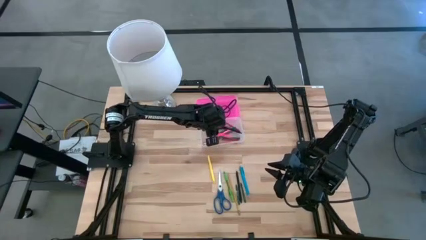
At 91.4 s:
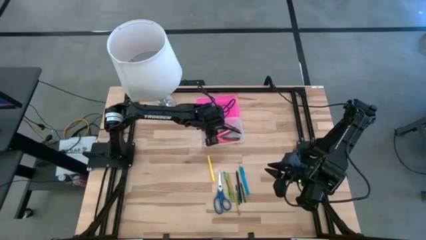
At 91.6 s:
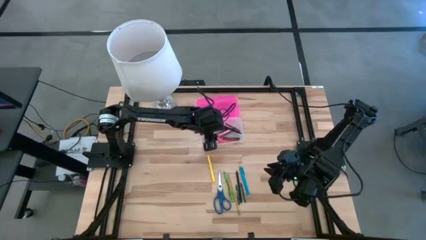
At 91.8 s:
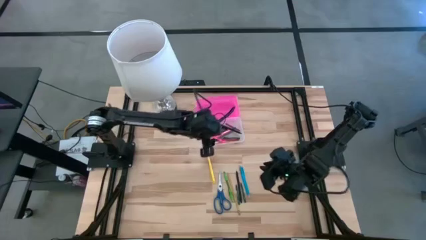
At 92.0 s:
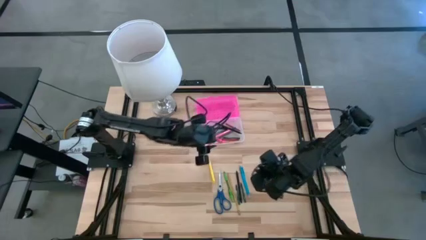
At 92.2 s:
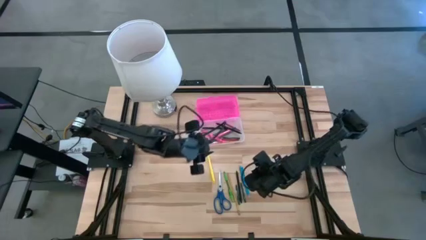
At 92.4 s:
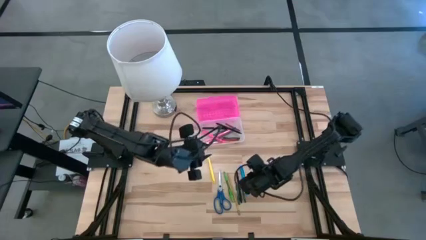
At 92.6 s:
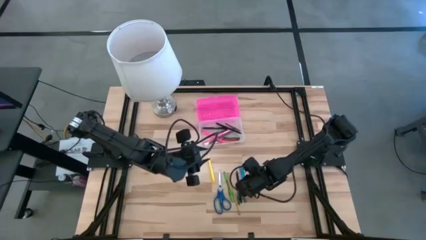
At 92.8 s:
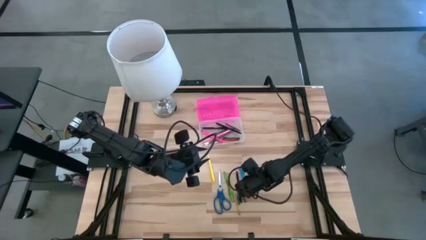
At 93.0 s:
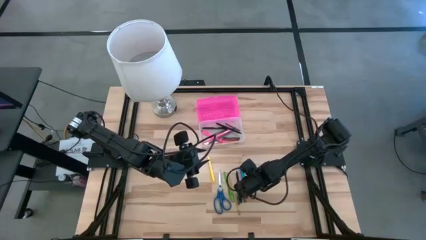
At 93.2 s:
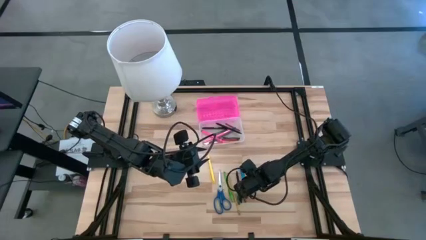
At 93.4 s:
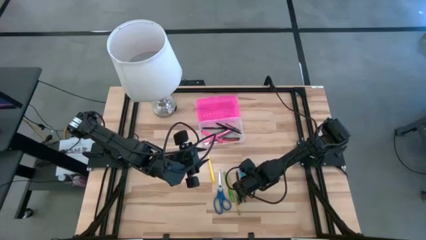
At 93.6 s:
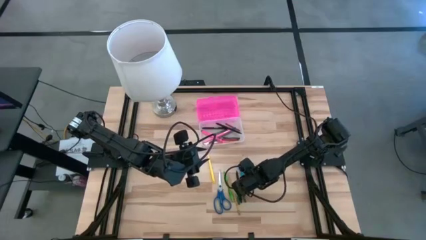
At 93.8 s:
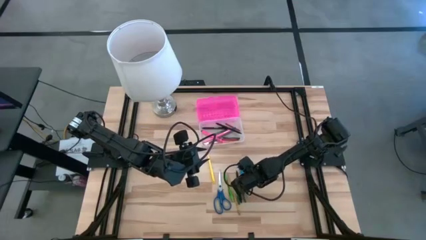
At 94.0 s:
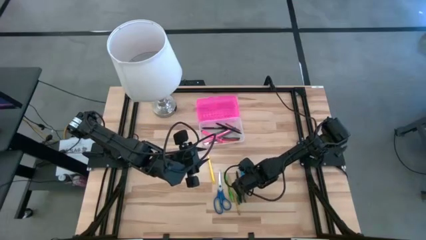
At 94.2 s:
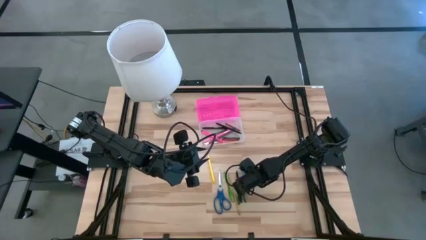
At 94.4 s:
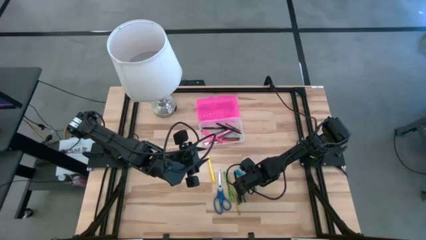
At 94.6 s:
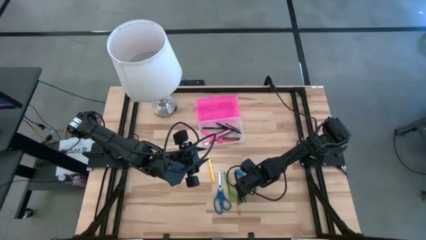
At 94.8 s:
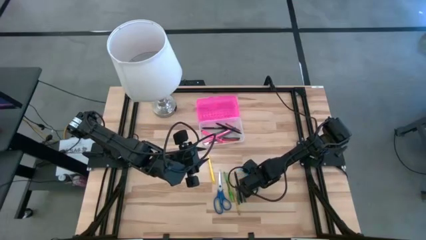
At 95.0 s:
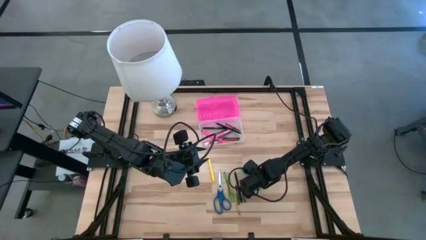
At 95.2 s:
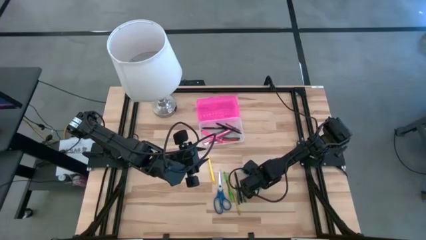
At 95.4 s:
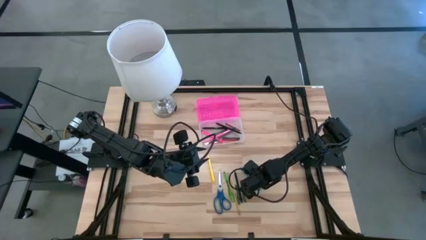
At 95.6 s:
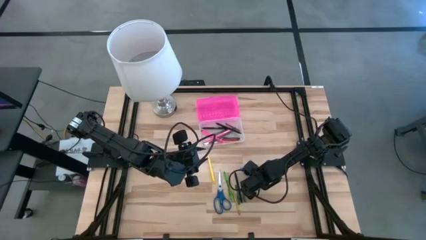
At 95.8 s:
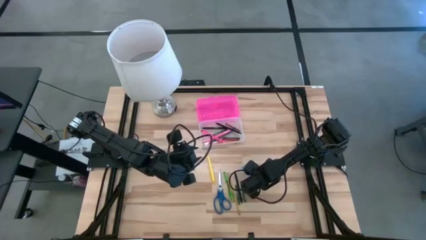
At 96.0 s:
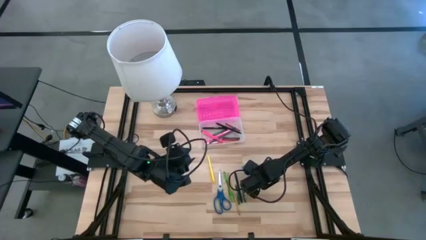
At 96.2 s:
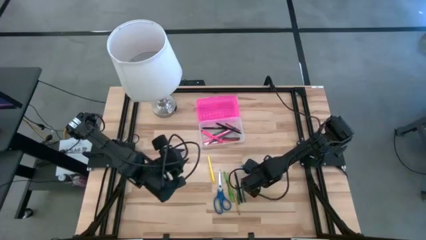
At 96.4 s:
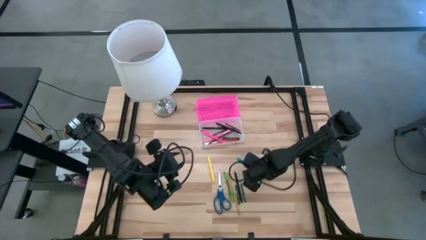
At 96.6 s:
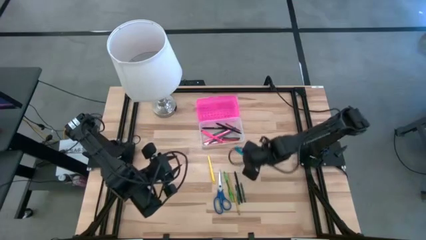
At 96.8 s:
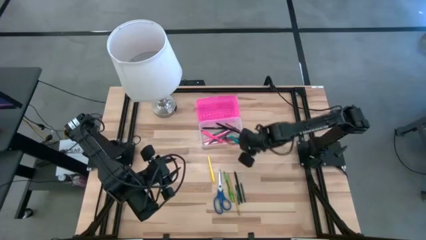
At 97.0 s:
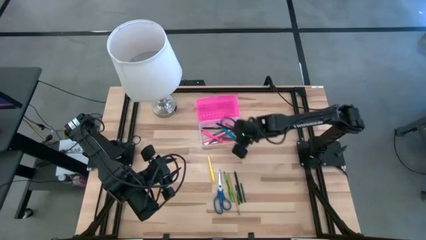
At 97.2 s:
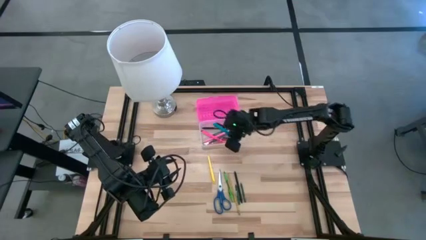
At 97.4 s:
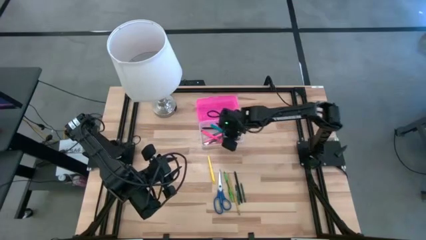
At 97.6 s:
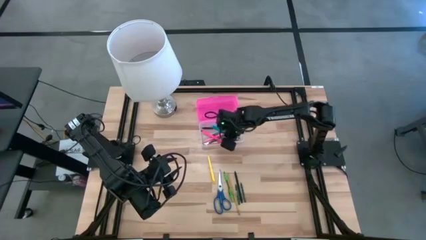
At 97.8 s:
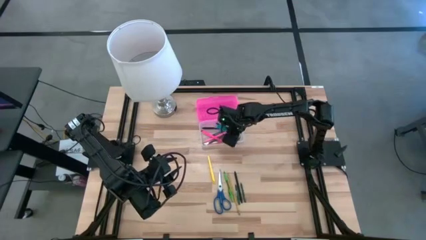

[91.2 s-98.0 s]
Task: Pick & place school supplies into a supply box
Put the blue pen into the pink supply box

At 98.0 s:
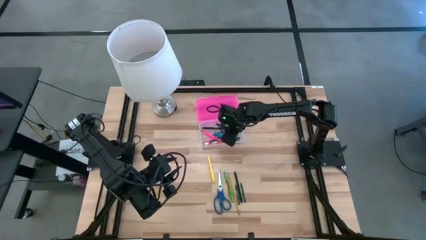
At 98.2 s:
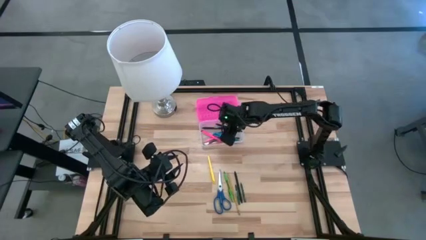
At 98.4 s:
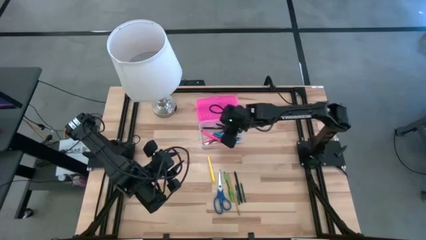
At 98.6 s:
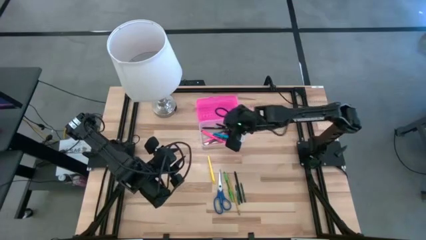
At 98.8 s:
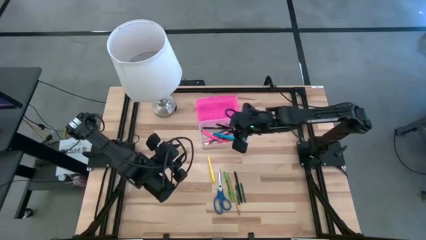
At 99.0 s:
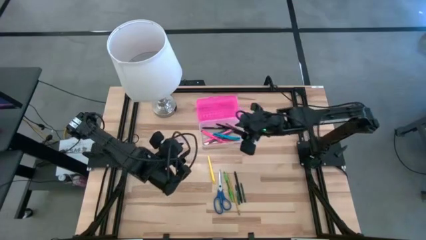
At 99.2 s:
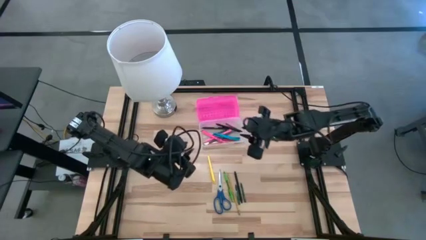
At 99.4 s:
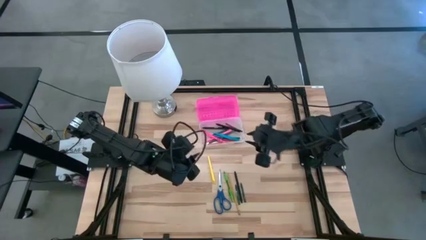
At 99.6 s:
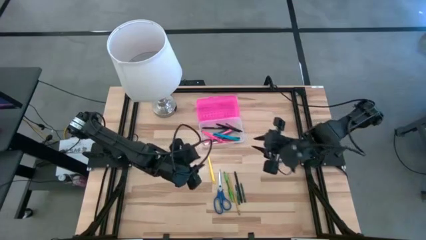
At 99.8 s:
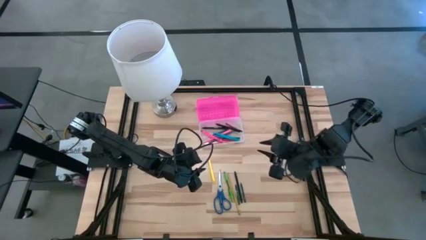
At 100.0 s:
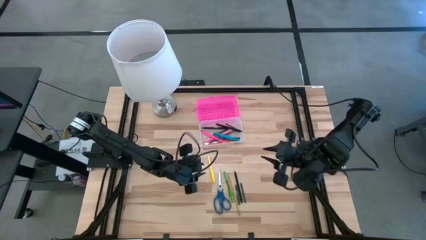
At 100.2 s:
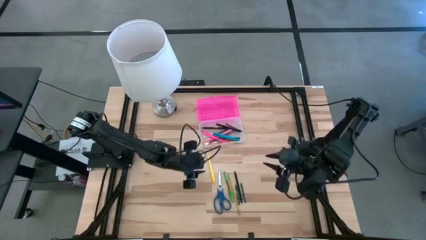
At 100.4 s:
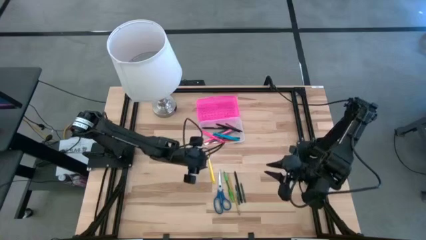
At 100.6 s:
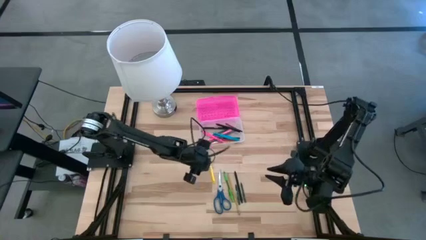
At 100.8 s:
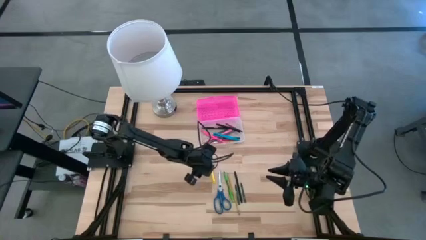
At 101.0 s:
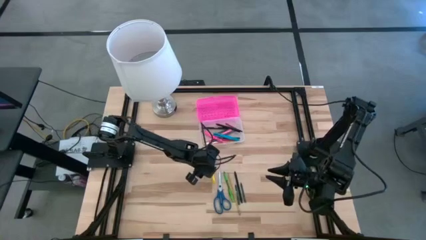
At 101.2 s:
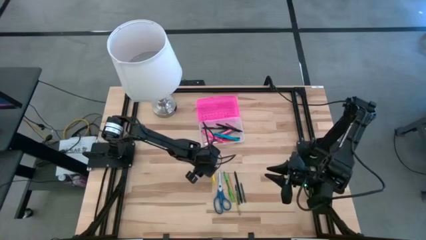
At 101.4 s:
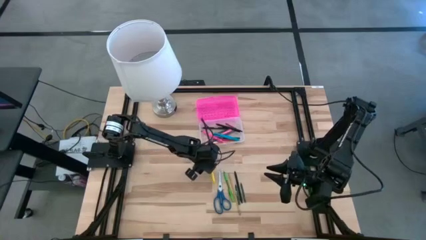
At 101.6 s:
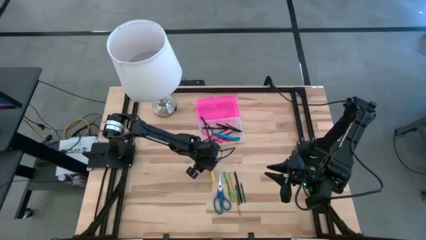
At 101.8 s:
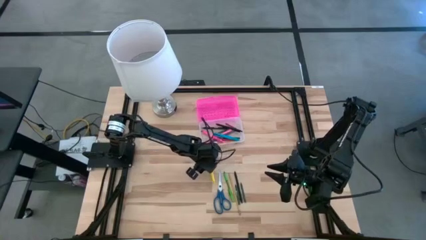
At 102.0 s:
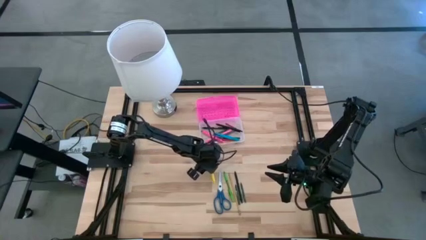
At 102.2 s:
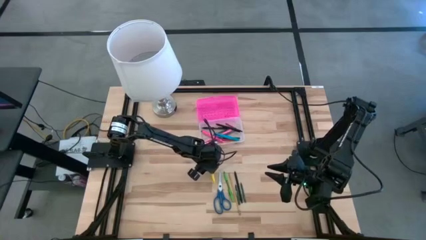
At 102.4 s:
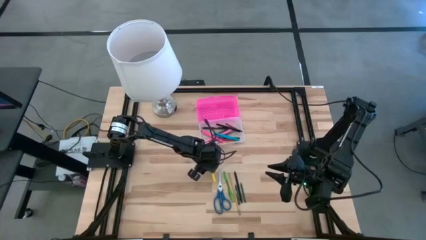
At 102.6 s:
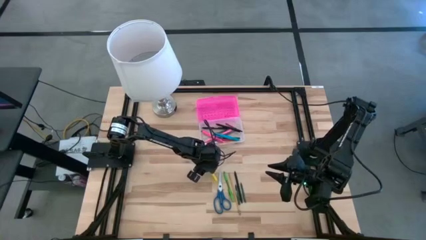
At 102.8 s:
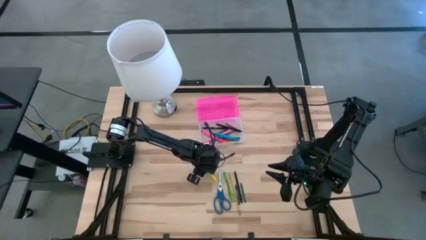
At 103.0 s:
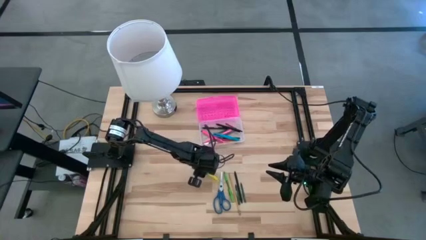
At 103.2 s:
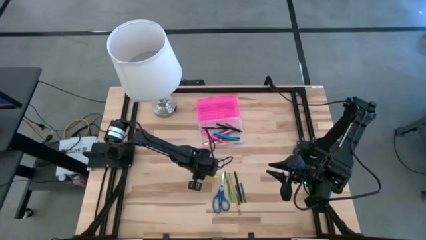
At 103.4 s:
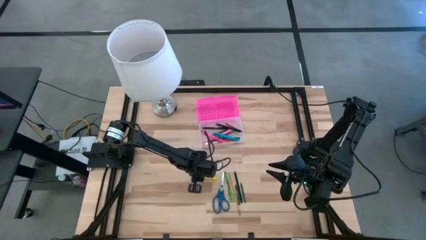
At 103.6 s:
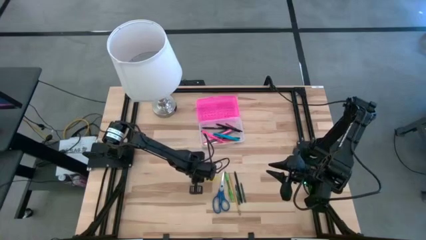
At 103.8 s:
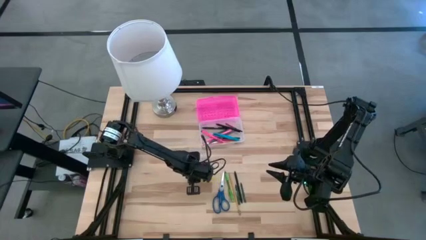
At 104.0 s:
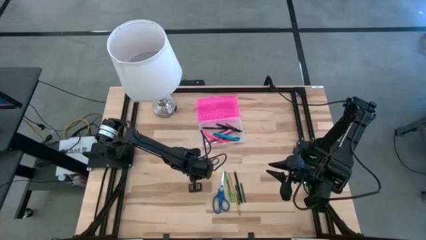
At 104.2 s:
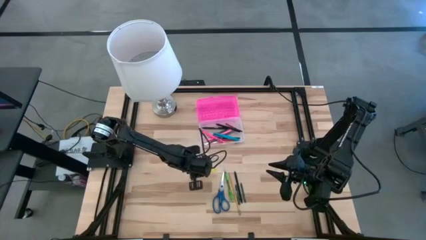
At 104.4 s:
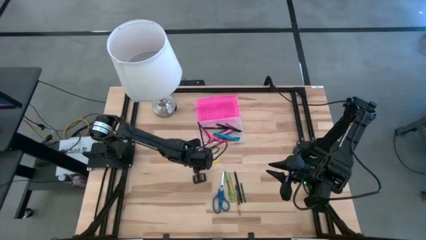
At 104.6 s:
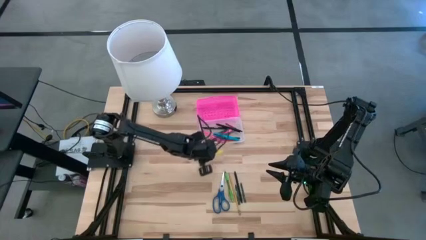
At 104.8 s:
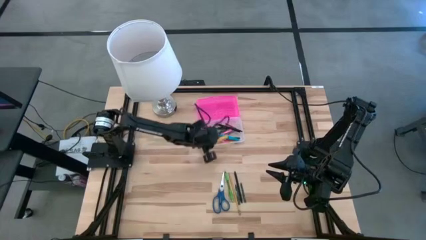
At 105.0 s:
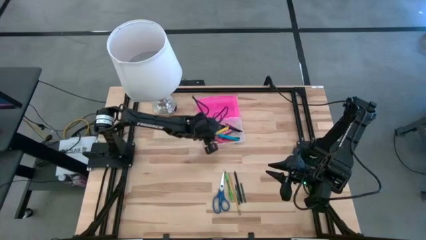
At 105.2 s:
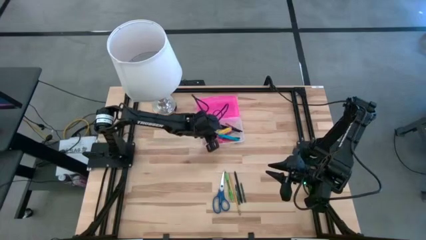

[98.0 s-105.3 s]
Put the yellow pen into the pink supply box
